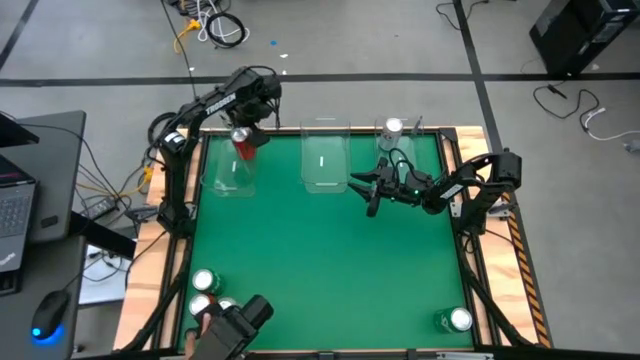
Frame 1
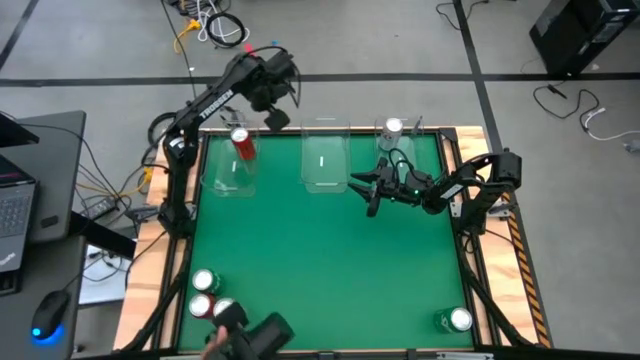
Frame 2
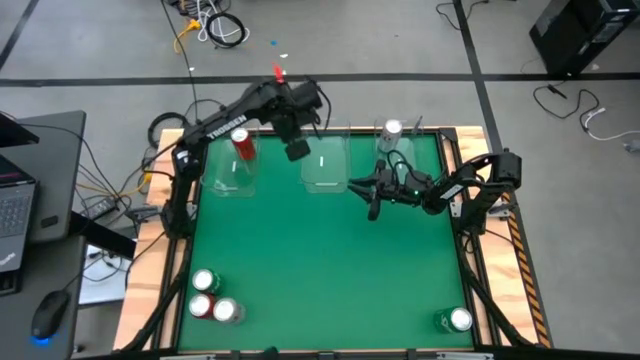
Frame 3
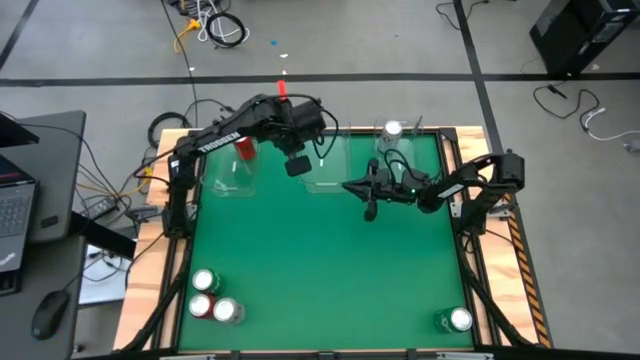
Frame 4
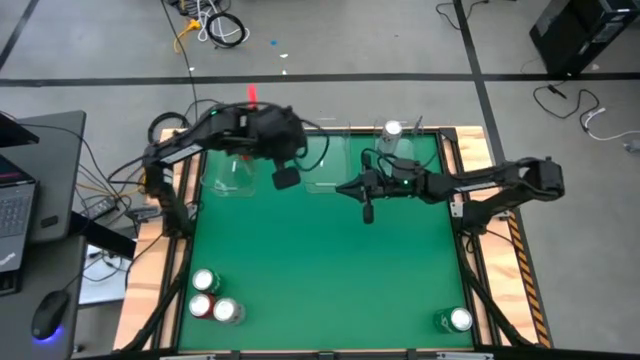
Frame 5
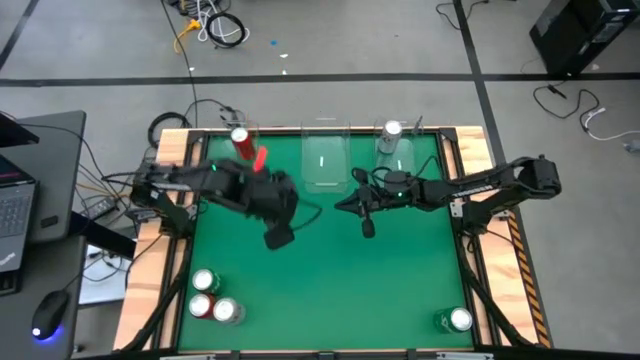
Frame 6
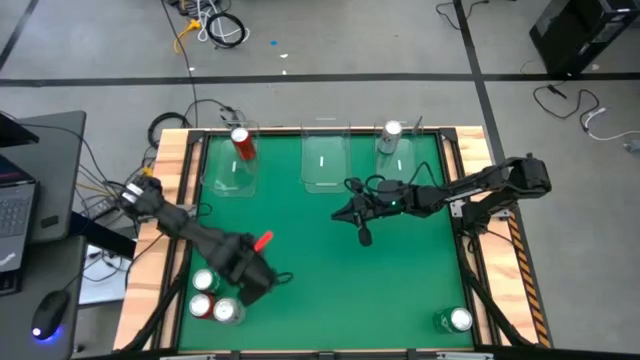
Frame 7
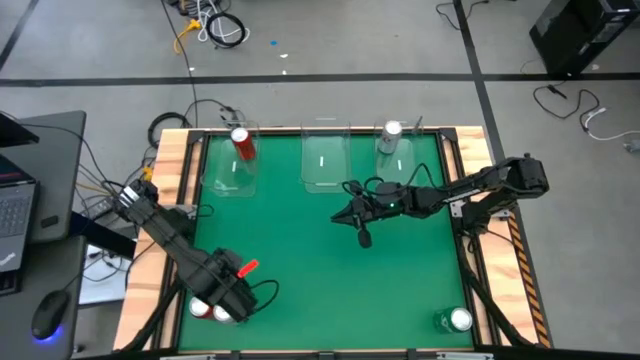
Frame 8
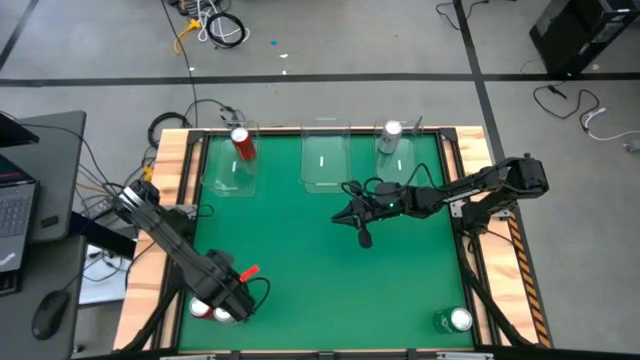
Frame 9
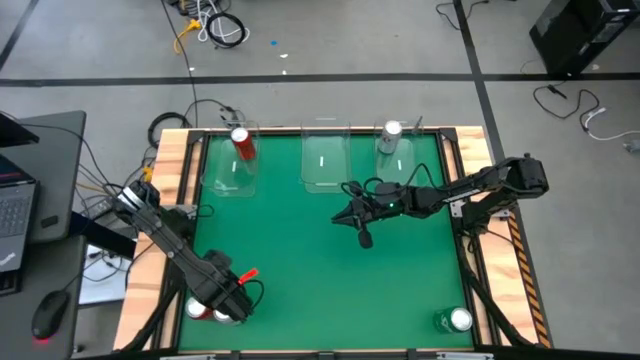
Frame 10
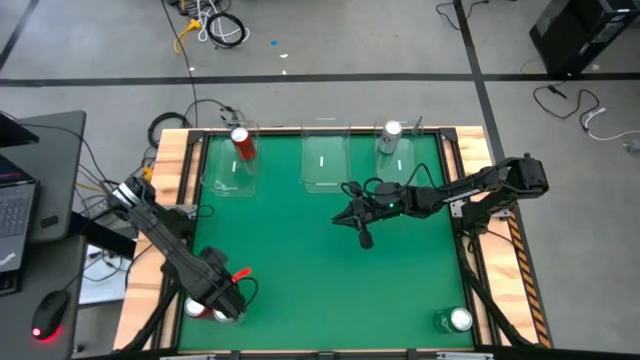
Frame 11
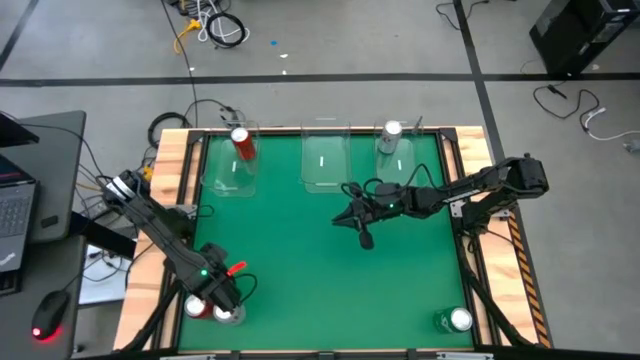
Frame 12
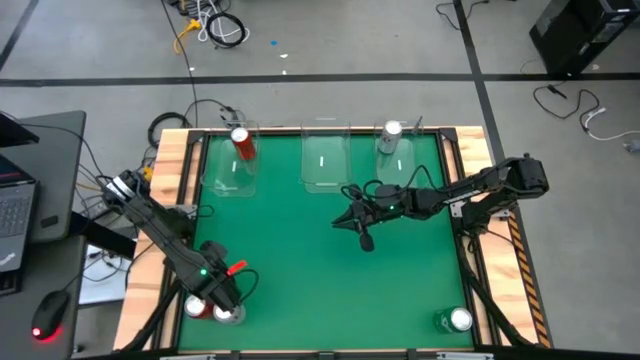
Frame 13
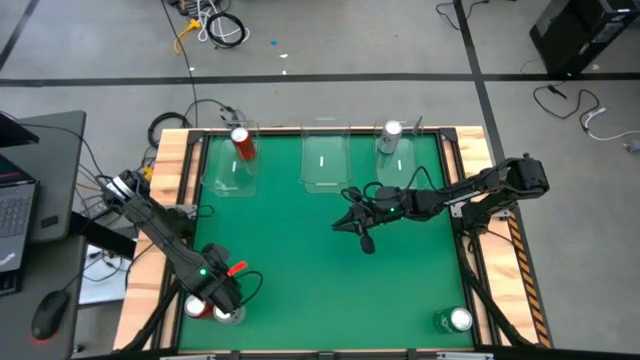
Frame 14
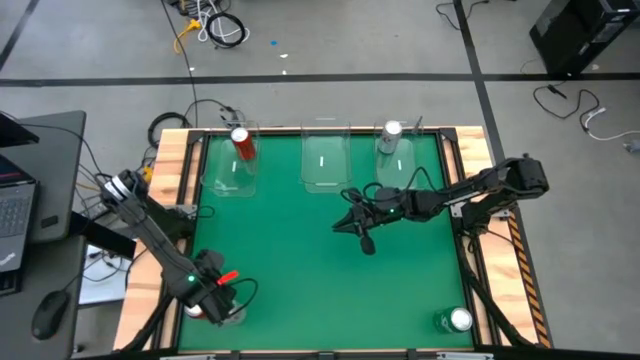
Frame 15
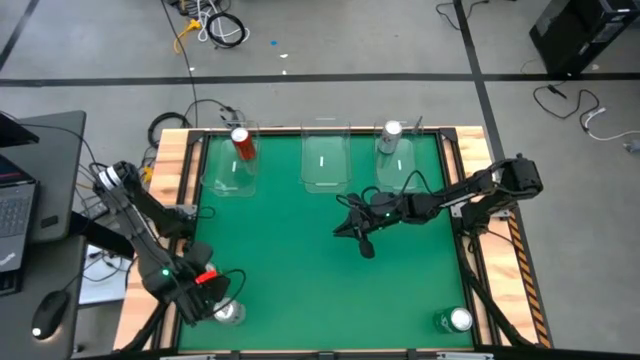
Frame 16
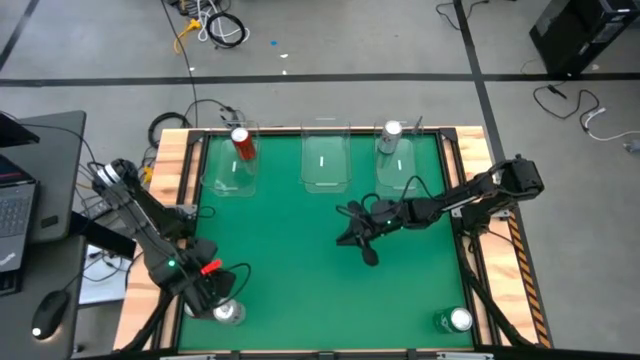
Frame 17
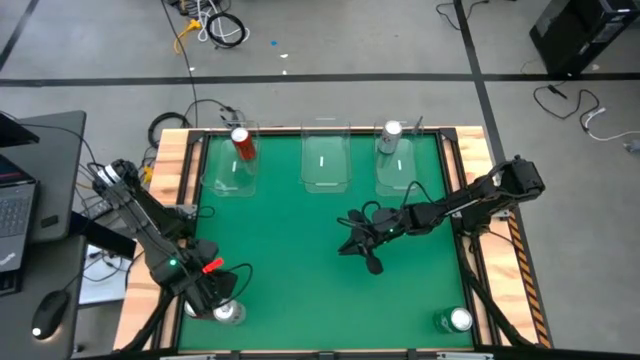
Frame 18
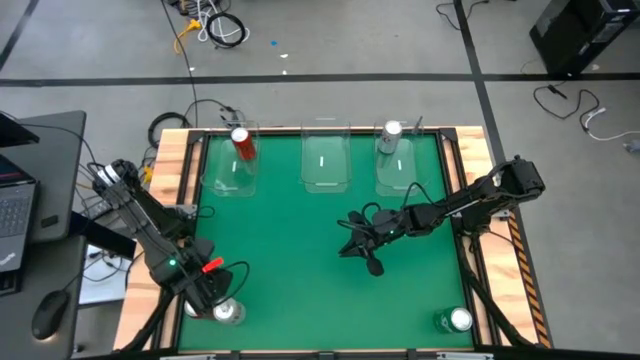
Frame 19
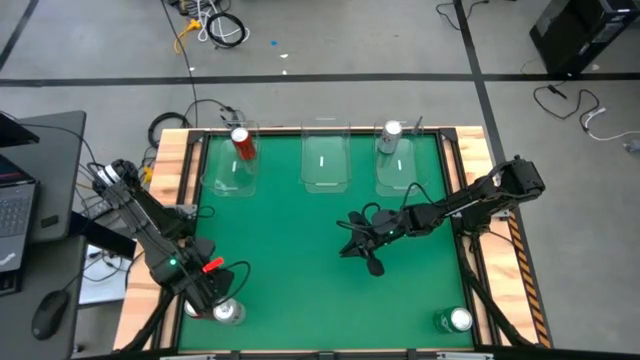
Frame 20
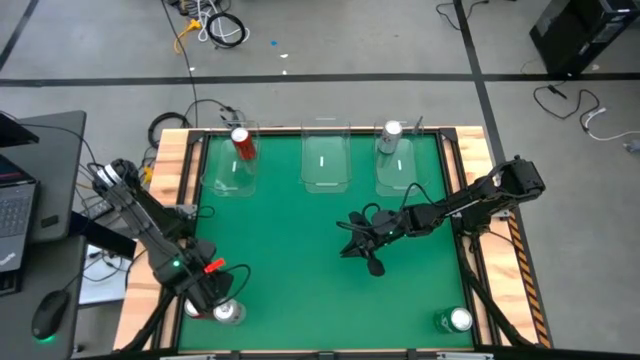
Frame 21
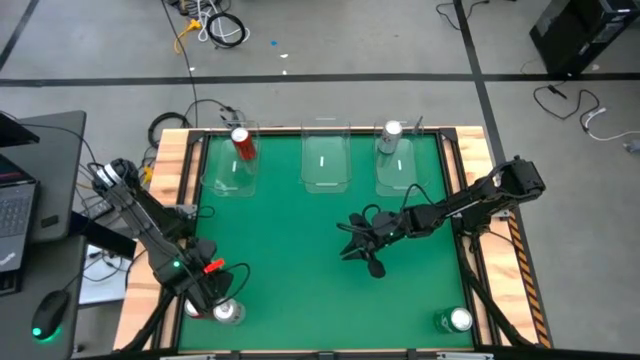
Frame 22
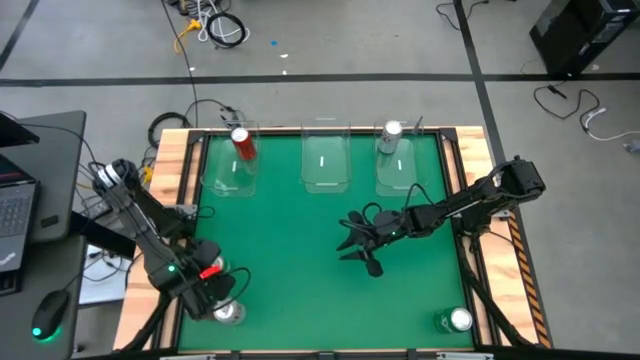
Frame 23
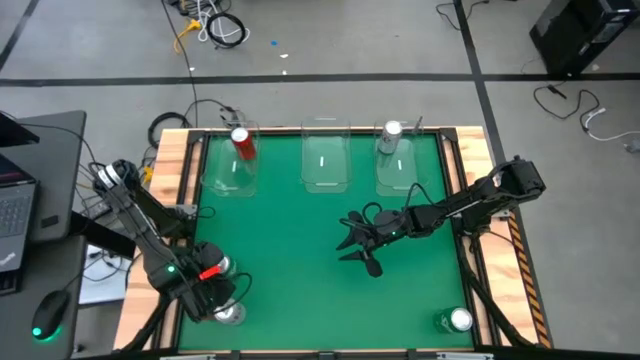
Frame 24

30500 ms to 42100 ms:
Task: Sort soda cans
Put the left green soda can into the center transparent bin

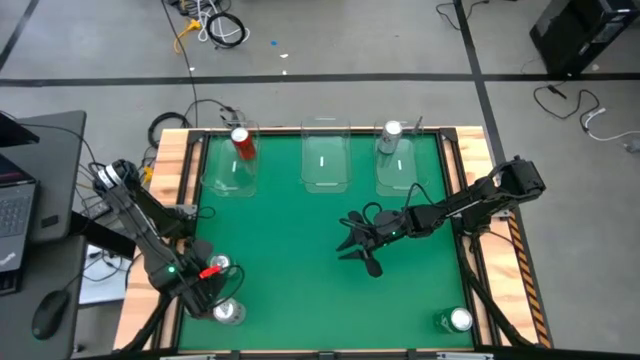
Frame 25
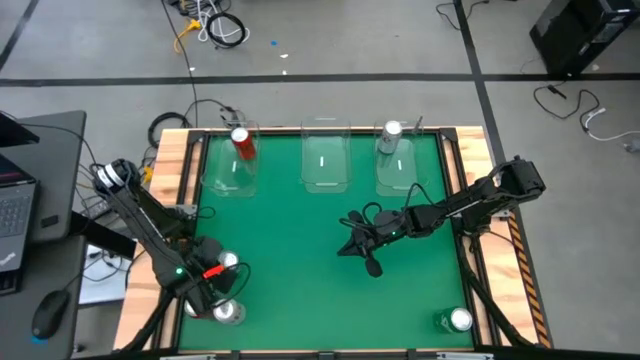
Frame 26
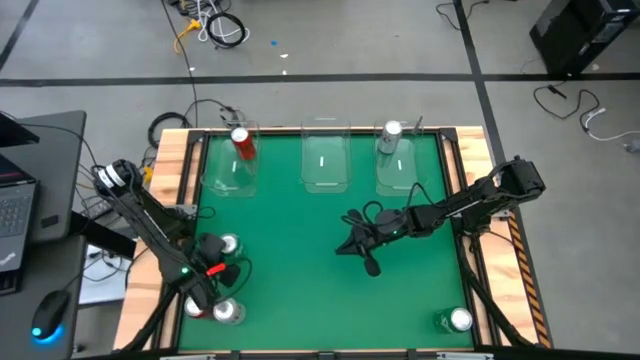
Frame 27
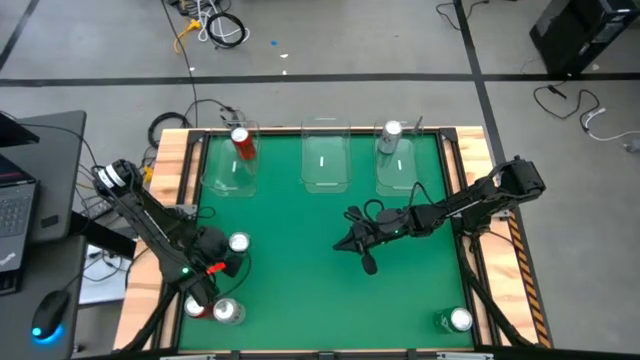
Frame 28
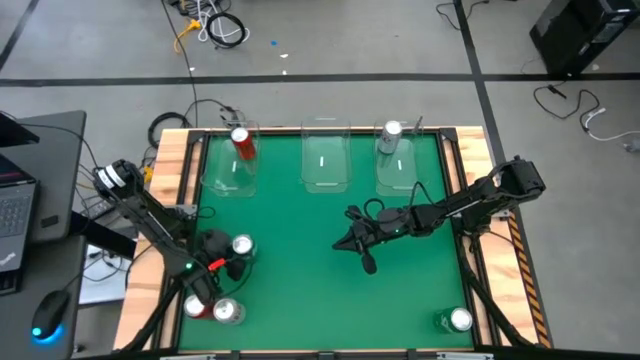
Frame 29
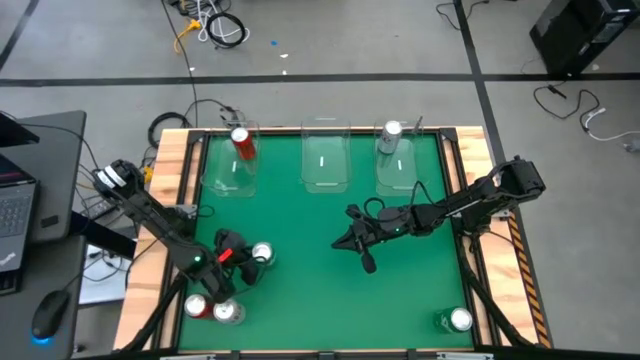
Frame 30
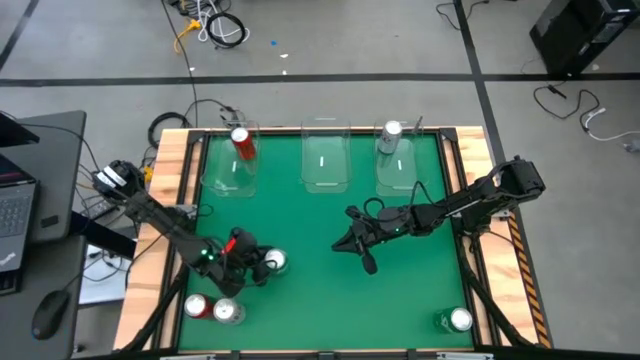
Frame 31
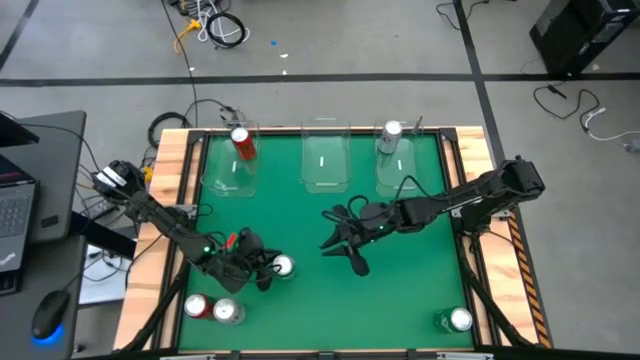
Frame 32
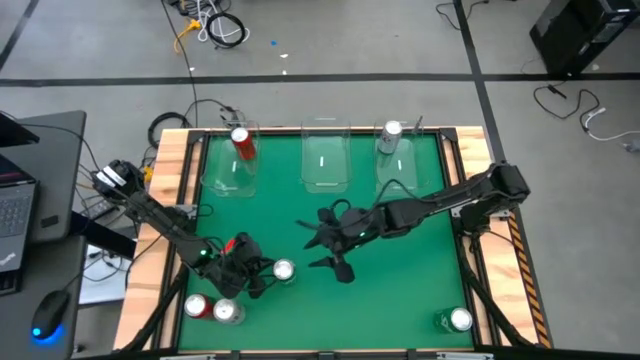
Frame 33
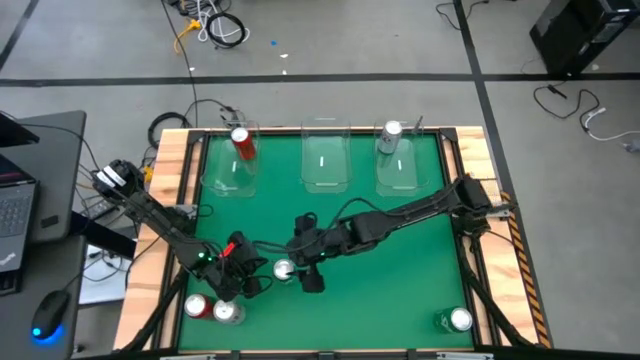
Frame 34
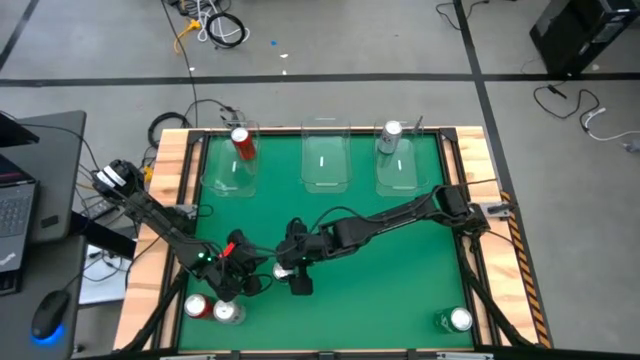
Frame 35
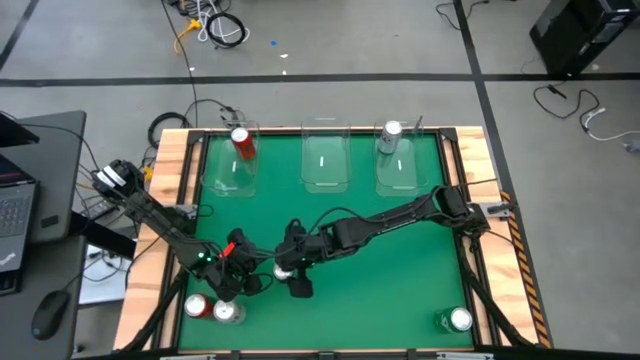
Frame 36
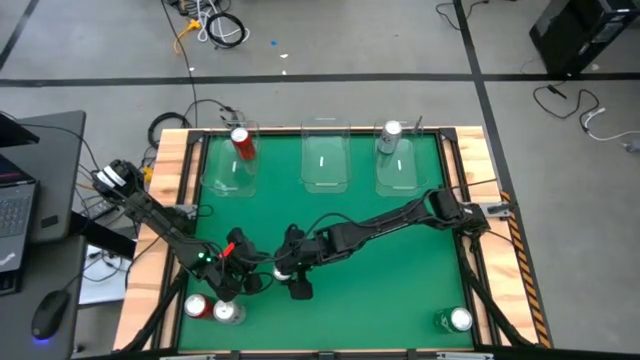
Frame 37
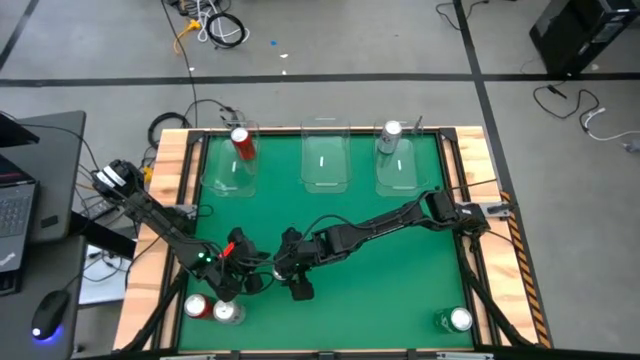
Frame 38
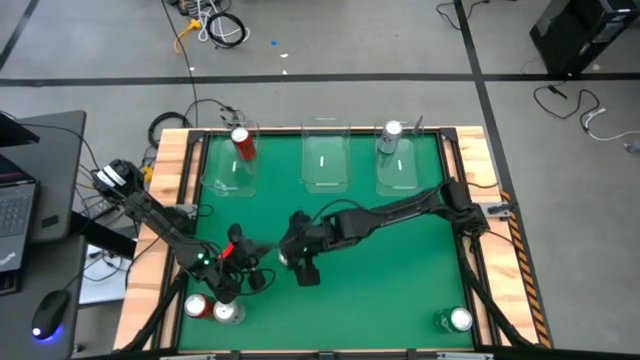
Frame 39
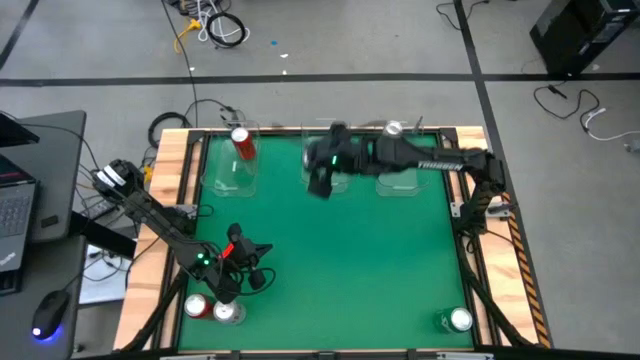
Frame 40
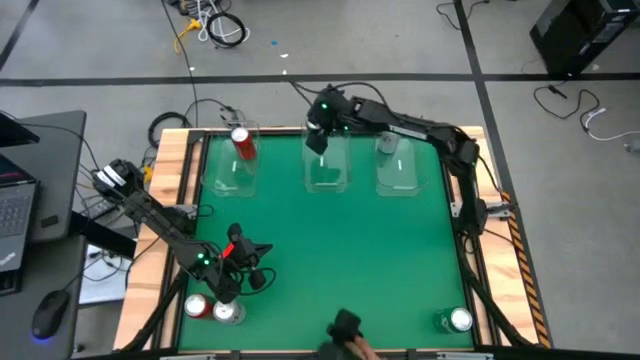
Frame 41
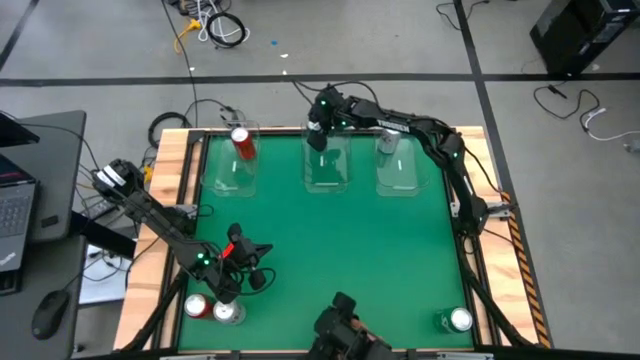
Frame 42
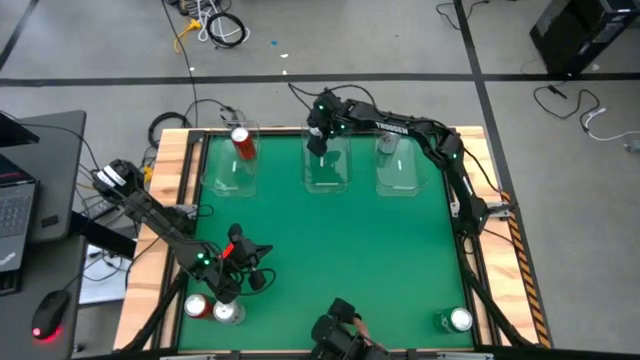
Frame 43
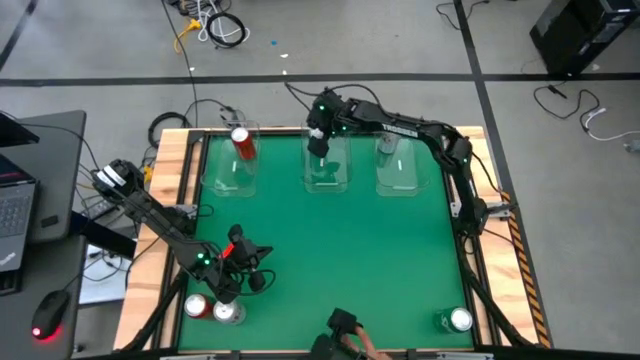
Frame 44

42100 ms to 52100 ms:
Put the left green soda can into the center transparent bin
